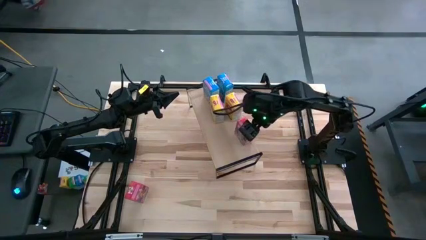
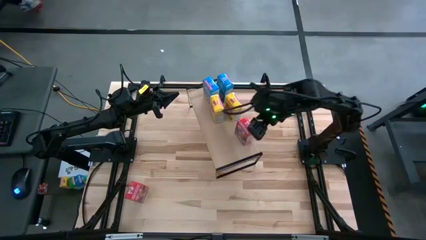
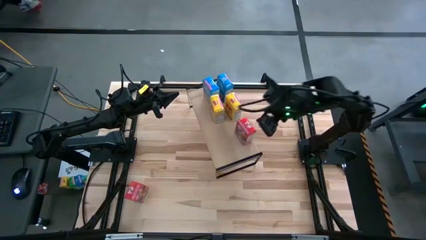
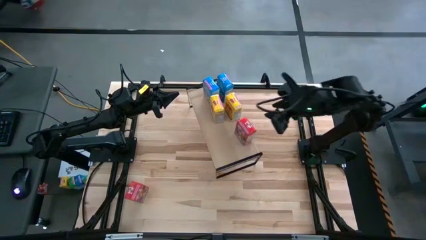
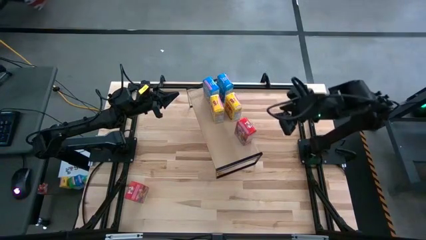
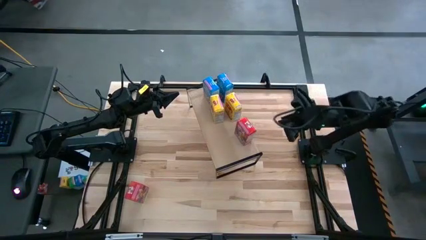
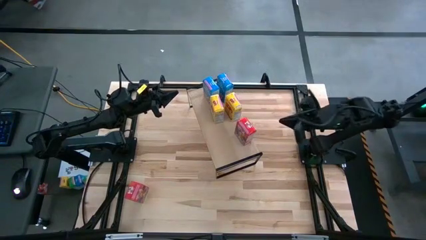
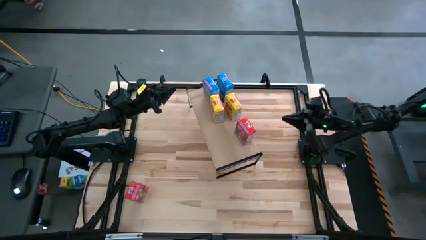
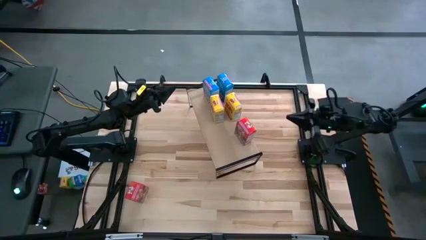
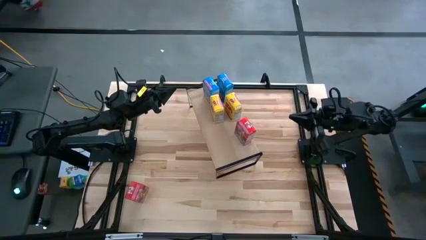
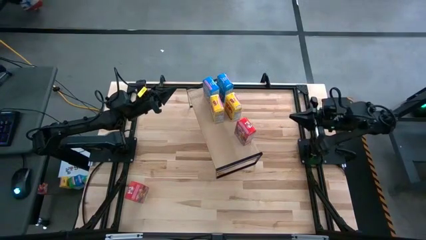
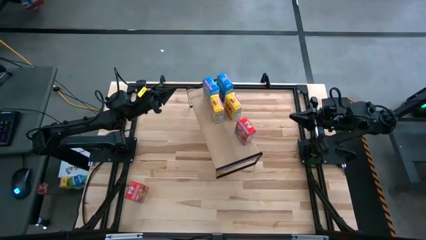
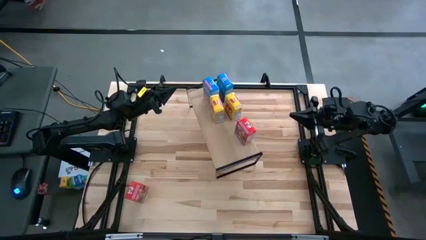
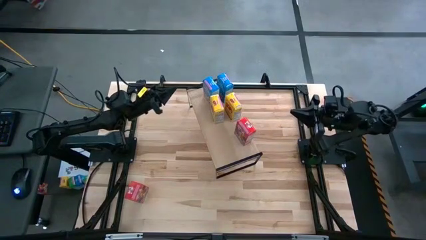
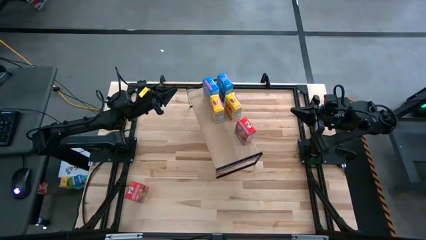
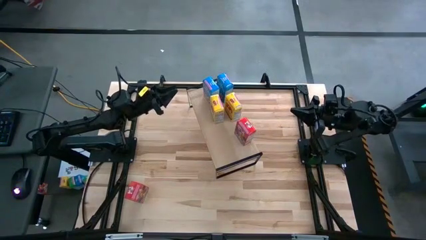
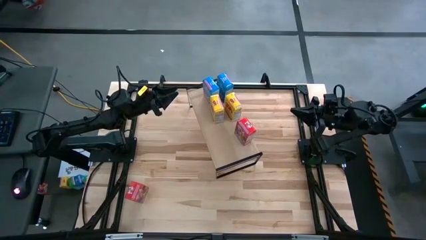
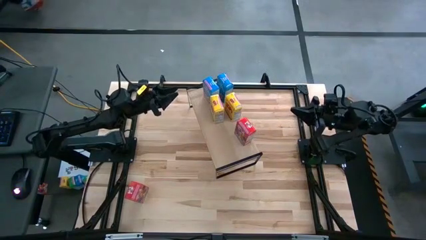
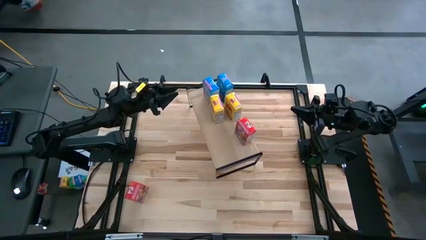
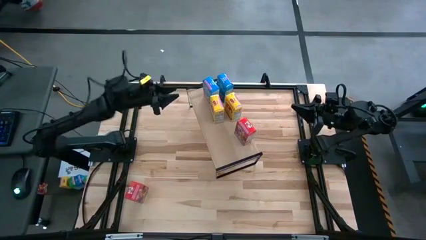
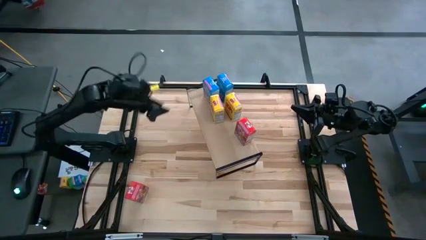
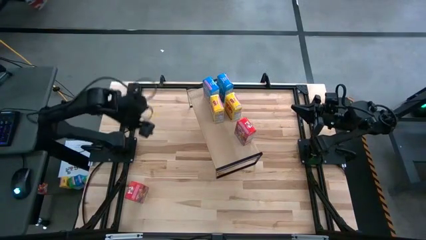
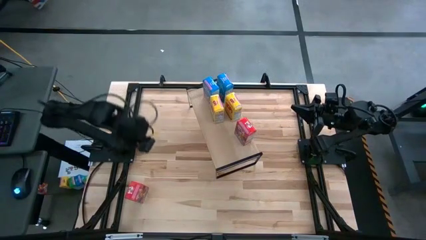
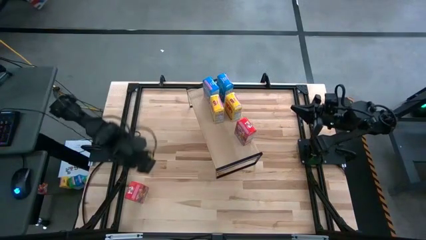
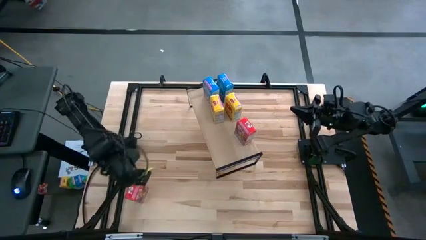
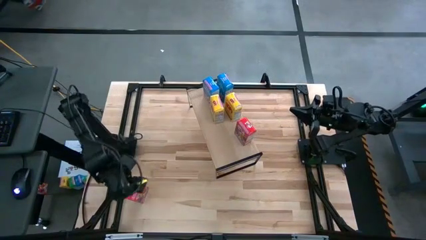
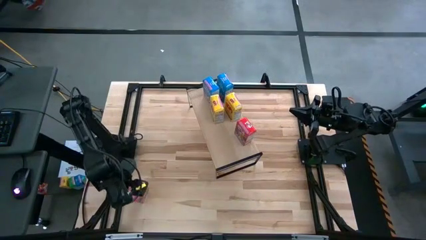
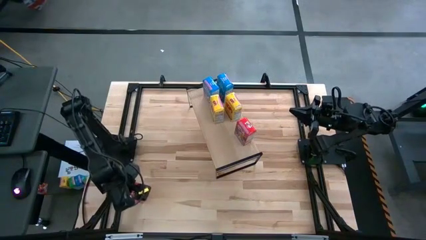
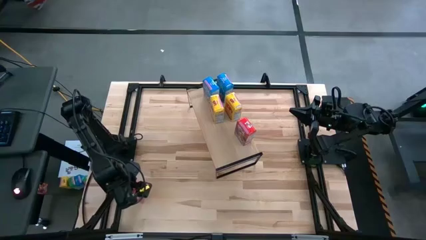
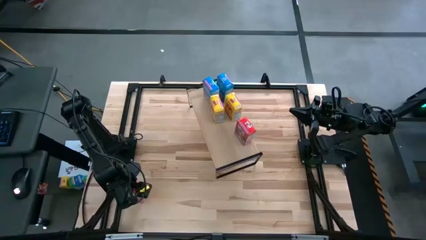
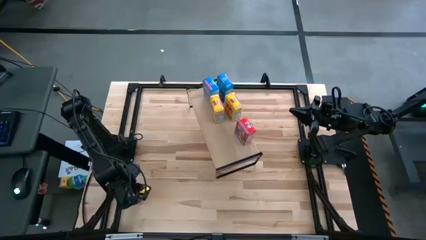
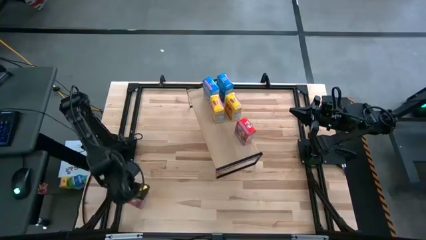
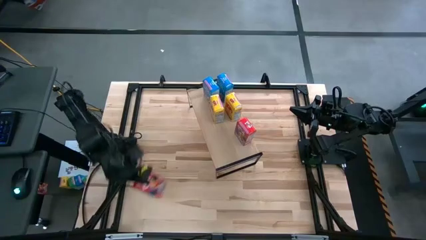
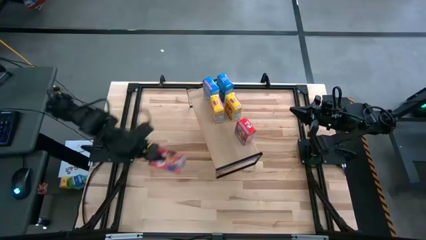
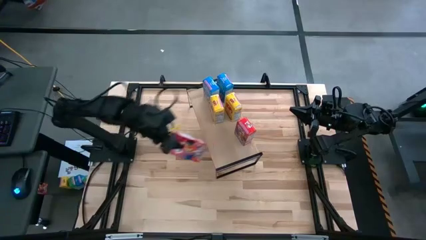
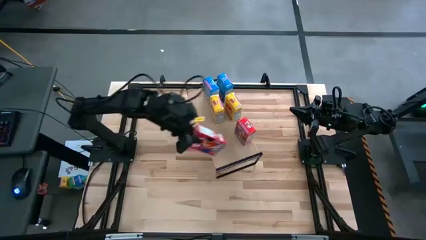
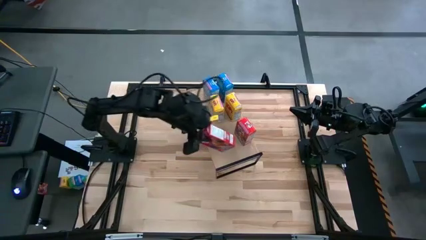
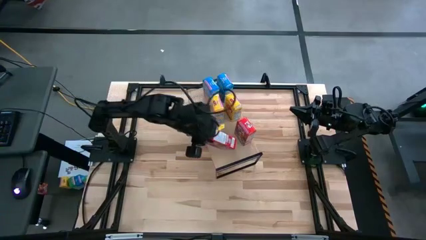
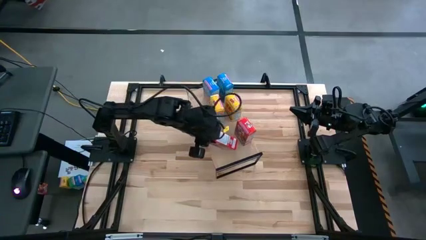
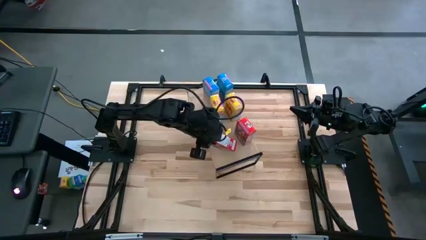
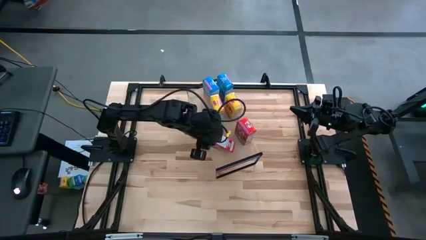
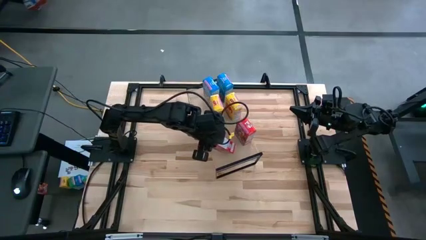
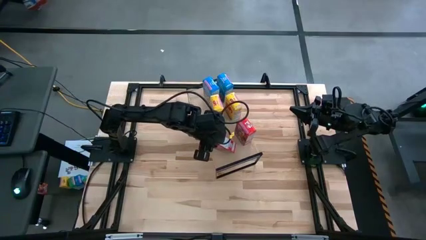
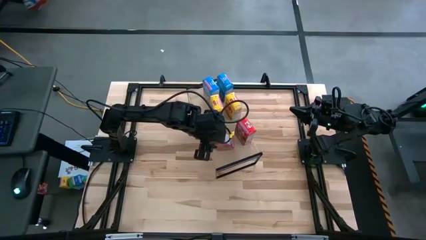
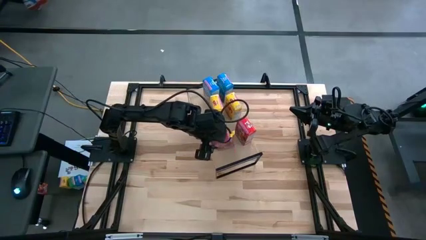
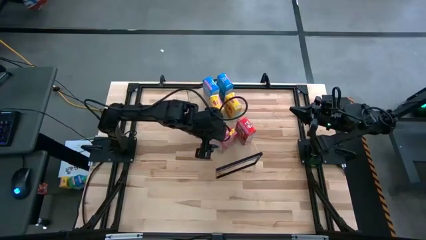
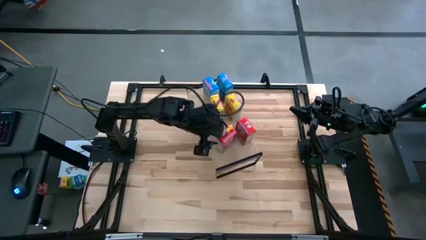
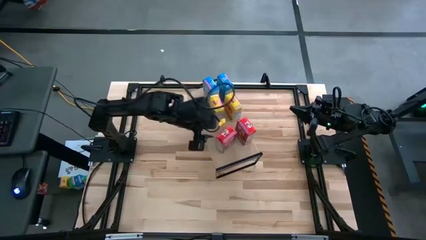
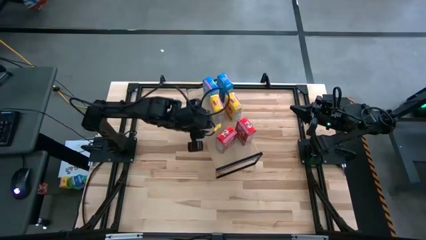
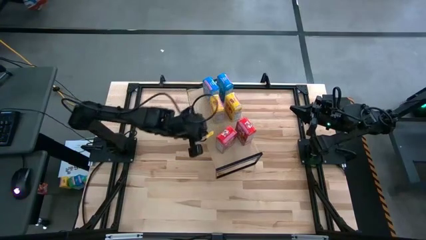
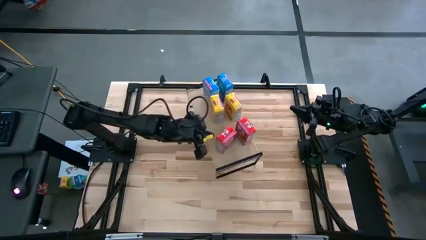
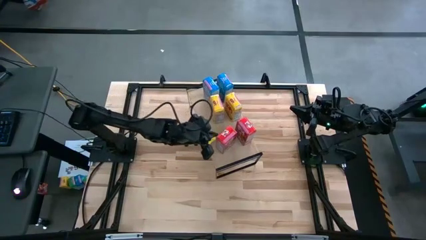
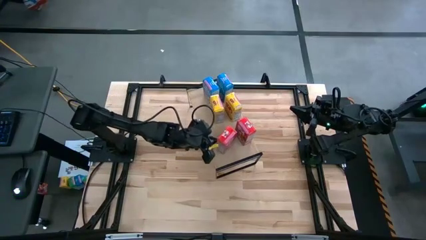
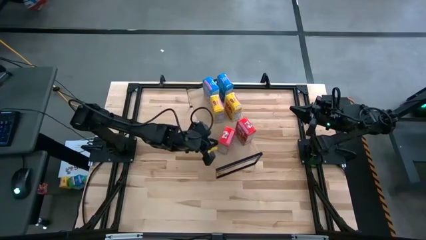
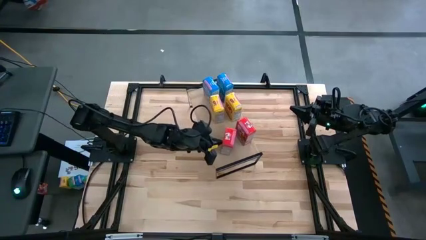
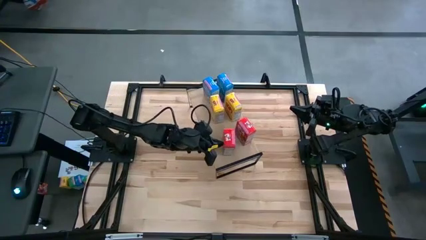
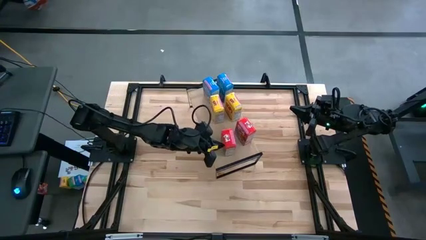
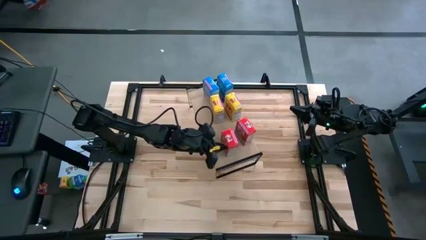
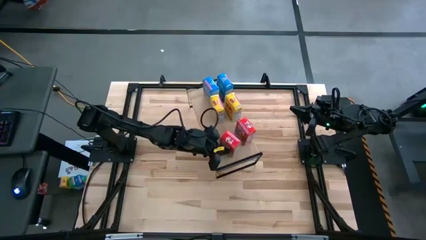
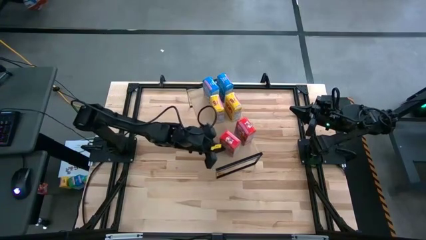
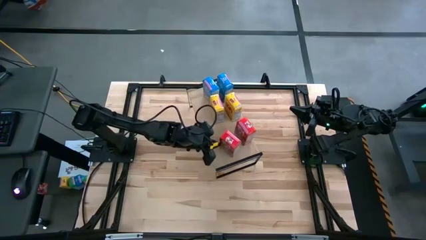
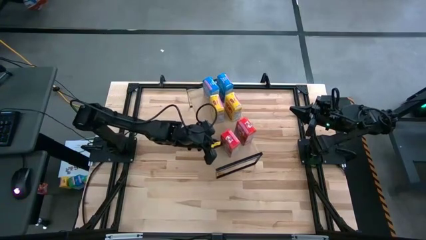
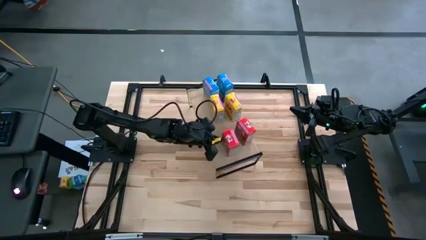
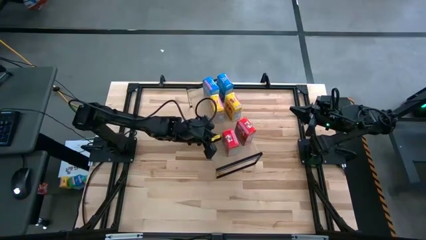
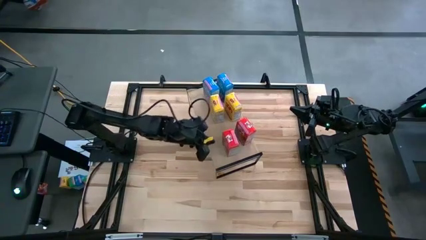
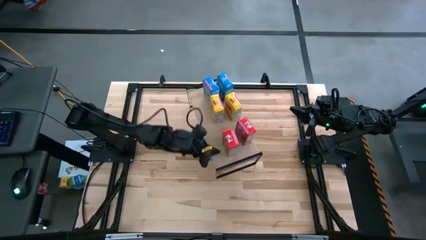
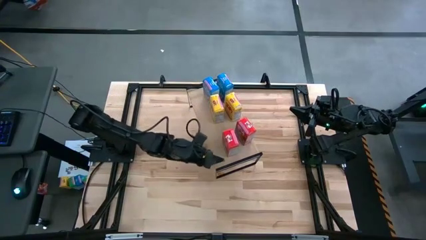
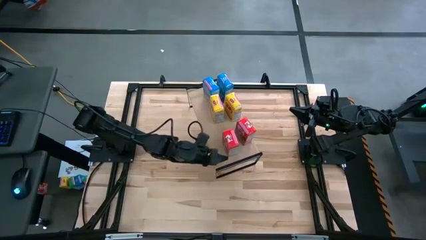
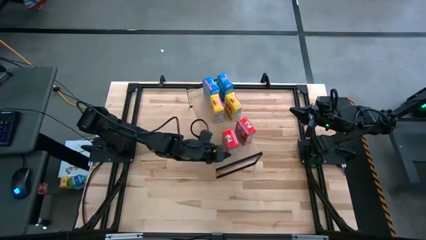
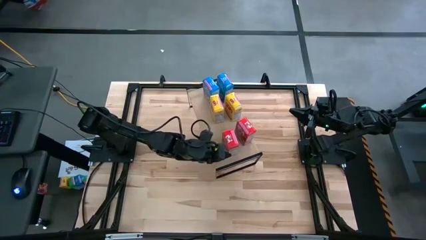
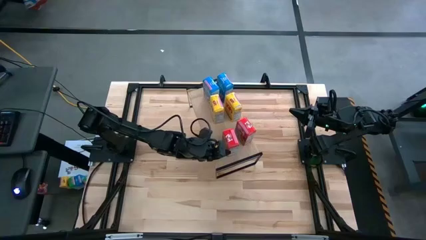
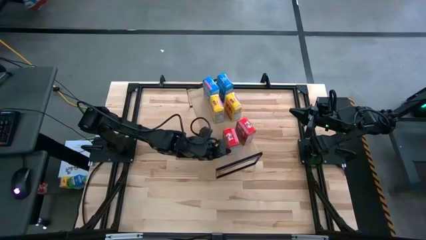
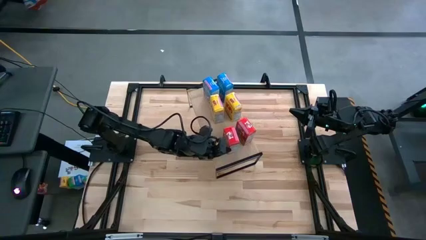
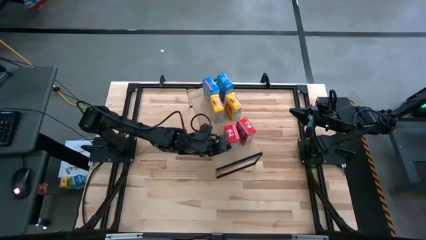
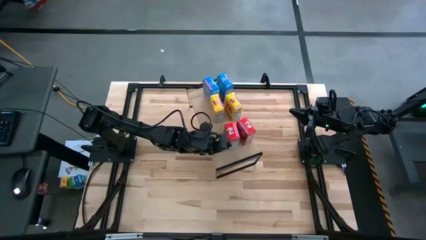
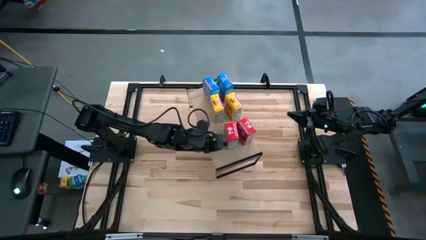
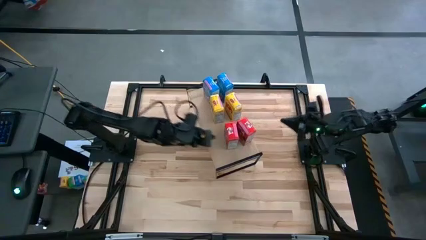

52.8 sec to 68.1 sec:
Task: Stack cereal on shelf
Put the red cereal box on the shelf

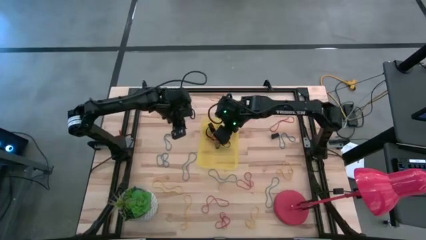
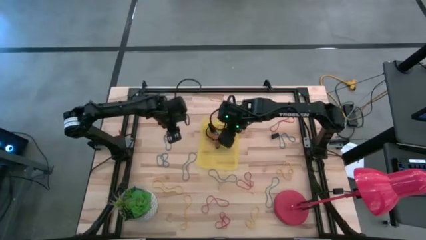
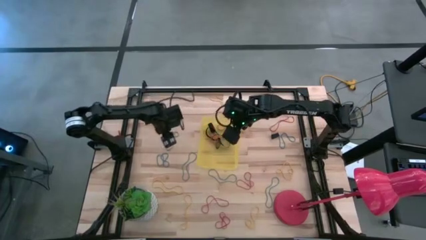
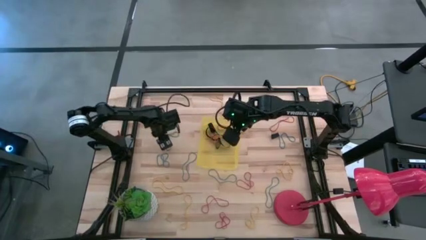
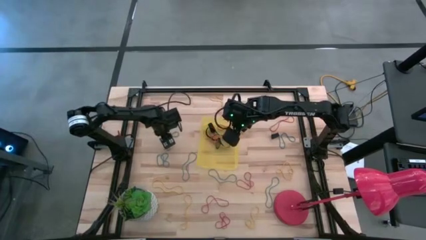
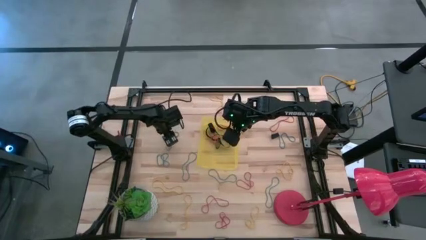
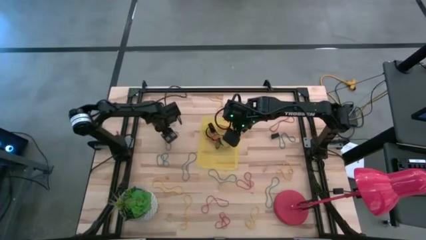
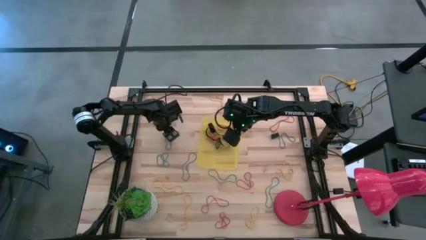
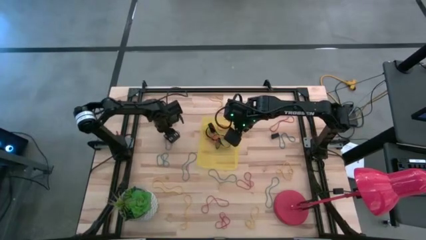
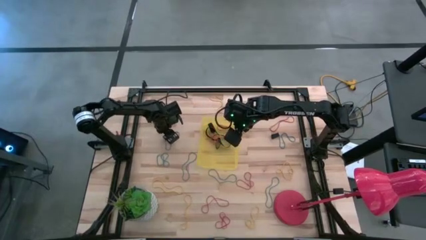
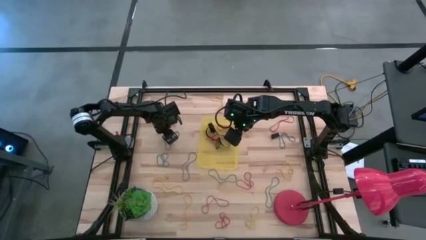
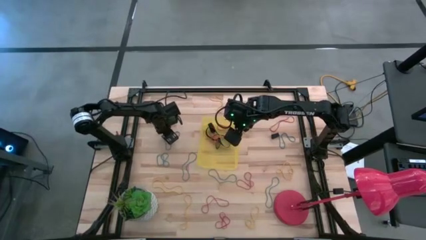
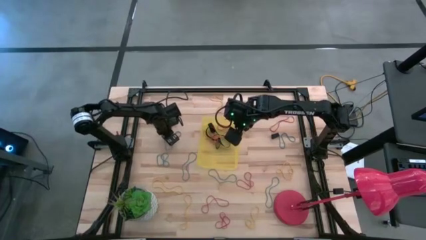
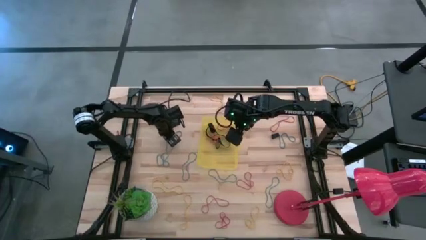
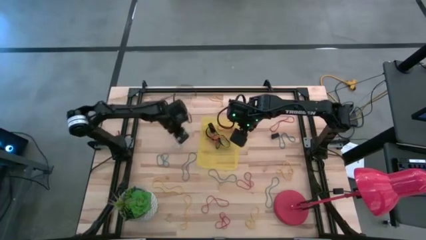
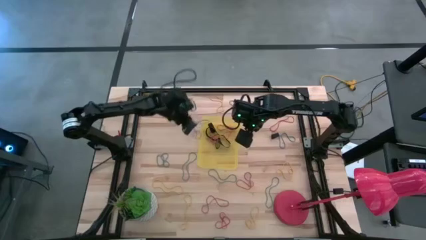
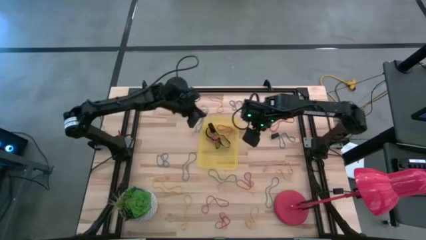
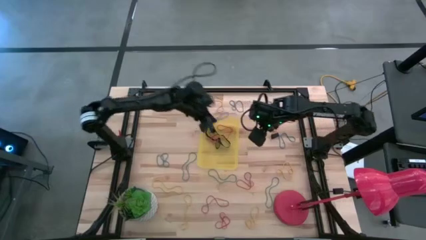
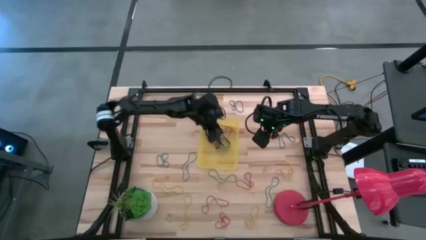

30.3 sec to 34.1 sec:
Task: Pick and place rubber bands into bin
Put the blue rubber band into the yellow bin
